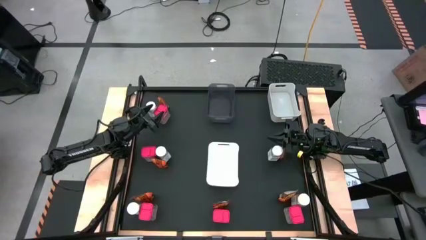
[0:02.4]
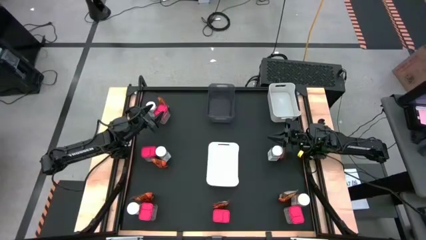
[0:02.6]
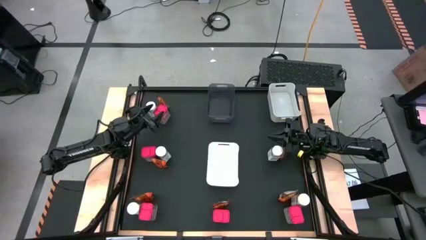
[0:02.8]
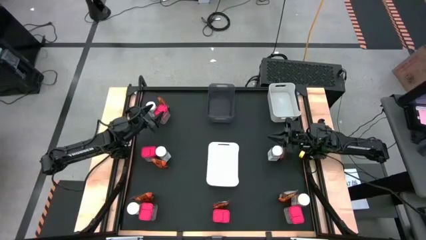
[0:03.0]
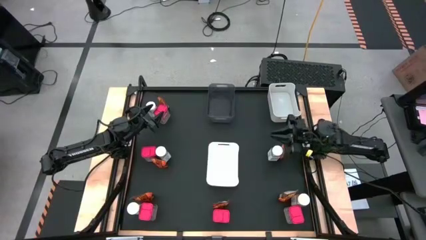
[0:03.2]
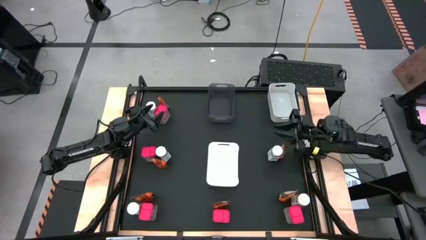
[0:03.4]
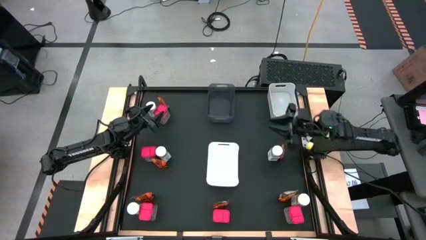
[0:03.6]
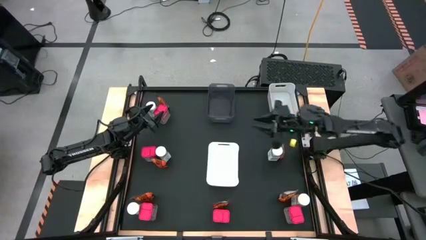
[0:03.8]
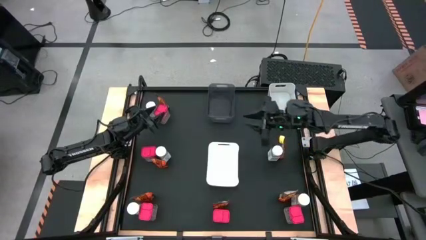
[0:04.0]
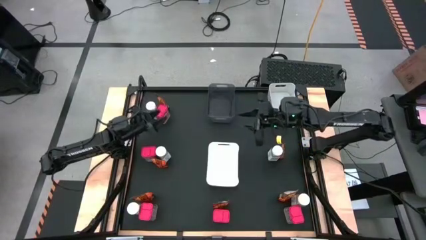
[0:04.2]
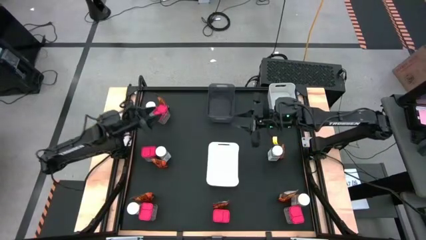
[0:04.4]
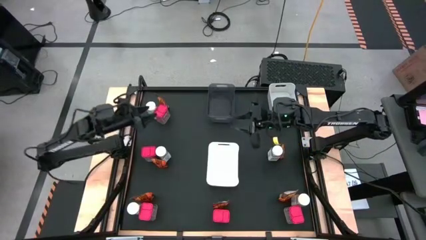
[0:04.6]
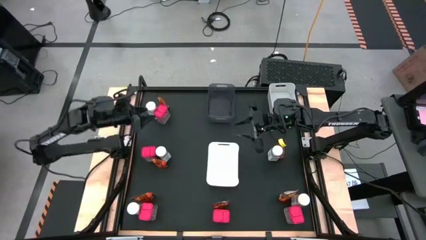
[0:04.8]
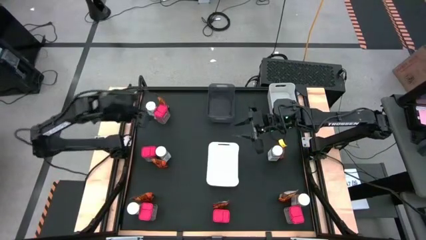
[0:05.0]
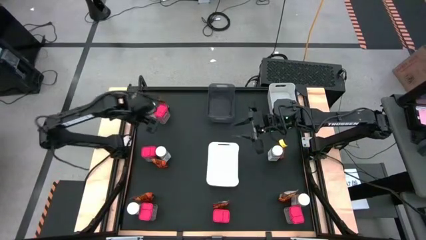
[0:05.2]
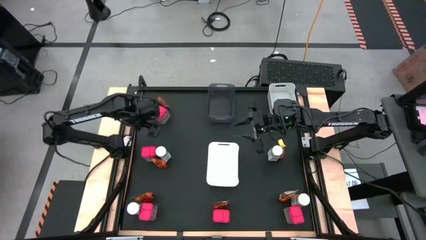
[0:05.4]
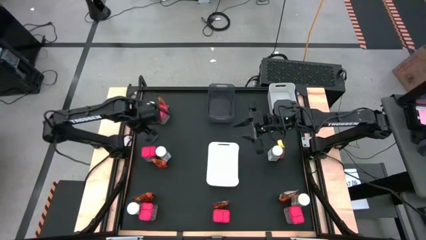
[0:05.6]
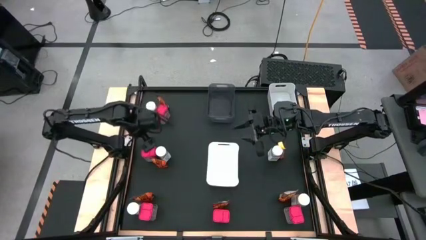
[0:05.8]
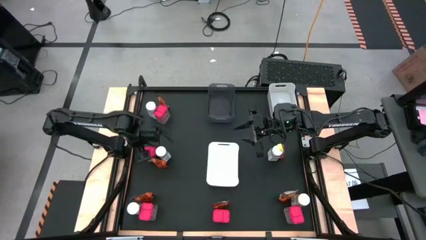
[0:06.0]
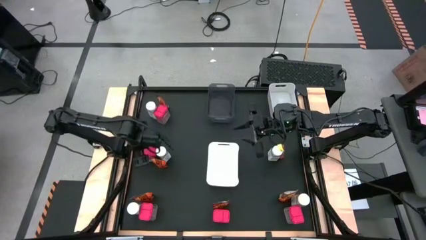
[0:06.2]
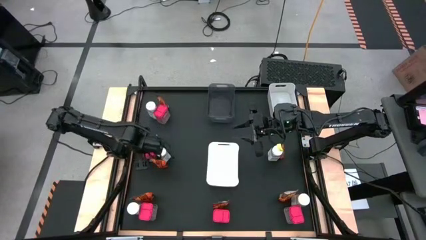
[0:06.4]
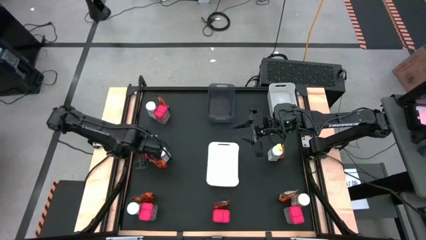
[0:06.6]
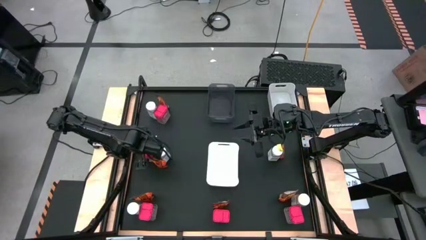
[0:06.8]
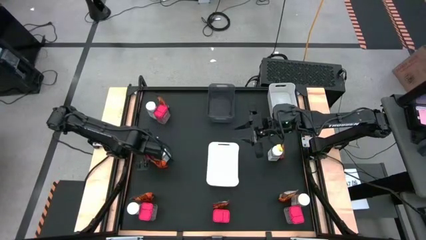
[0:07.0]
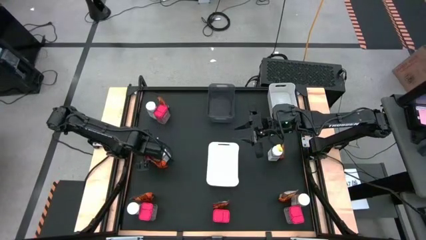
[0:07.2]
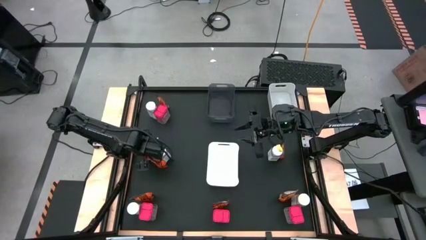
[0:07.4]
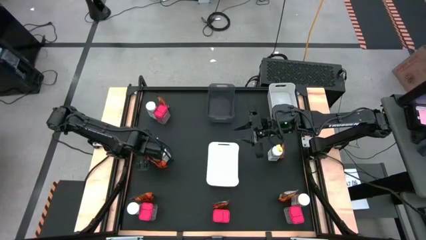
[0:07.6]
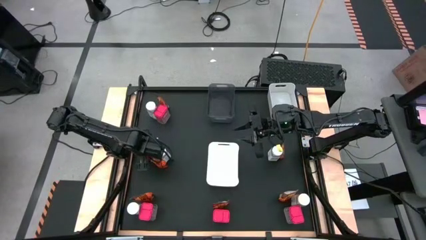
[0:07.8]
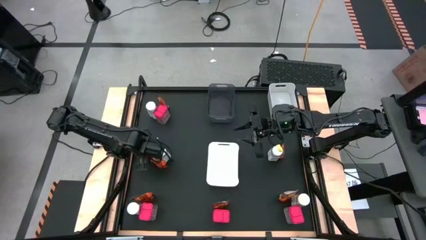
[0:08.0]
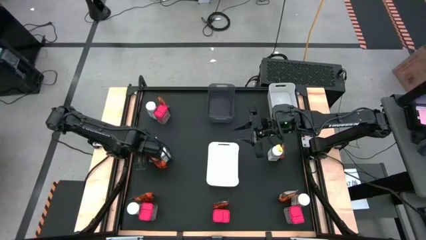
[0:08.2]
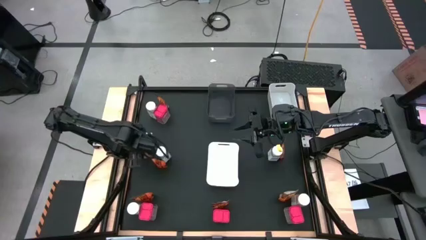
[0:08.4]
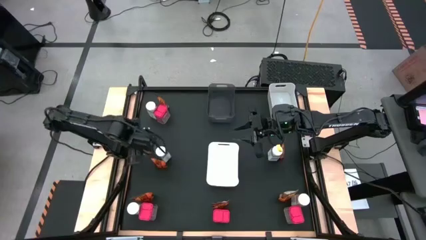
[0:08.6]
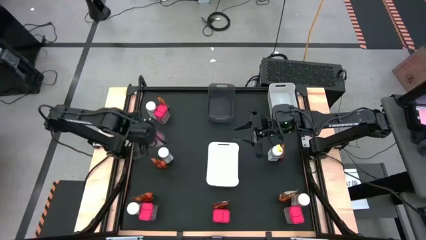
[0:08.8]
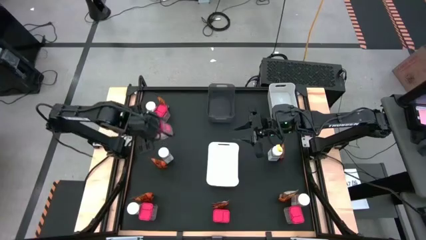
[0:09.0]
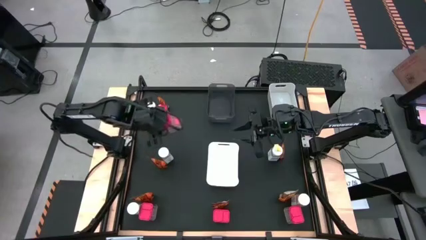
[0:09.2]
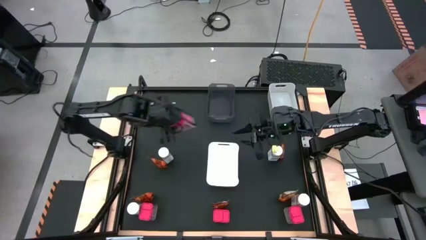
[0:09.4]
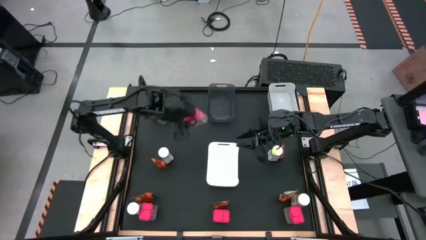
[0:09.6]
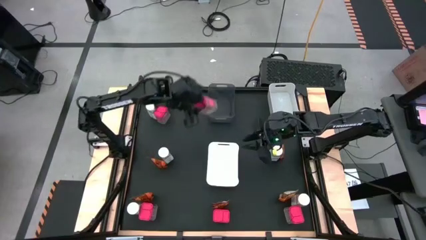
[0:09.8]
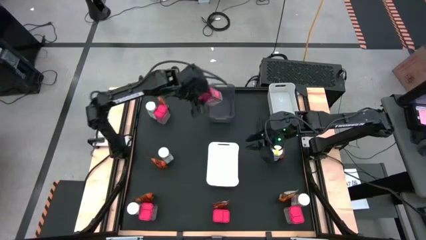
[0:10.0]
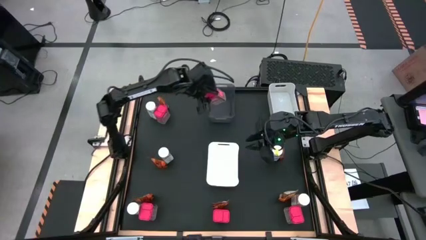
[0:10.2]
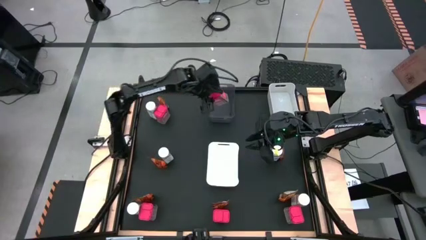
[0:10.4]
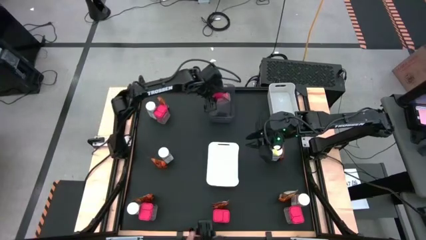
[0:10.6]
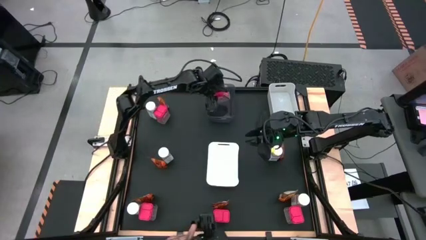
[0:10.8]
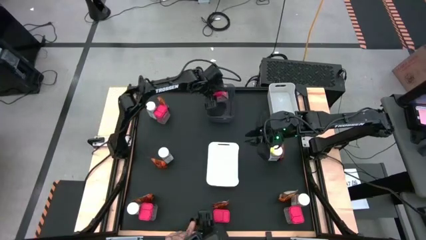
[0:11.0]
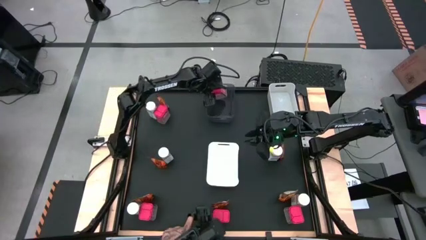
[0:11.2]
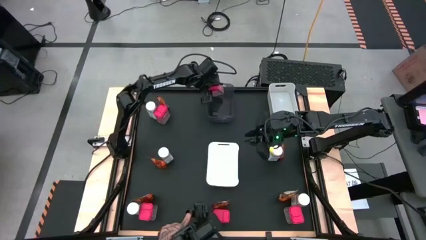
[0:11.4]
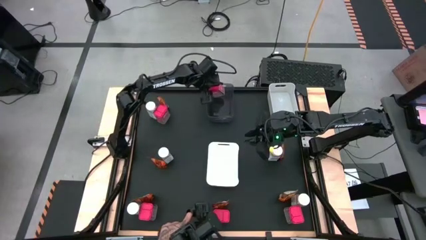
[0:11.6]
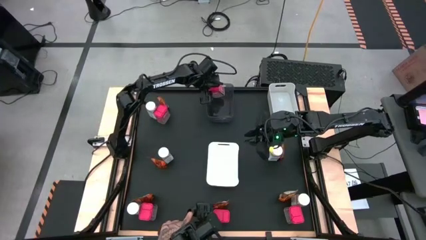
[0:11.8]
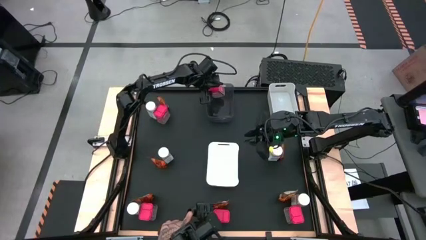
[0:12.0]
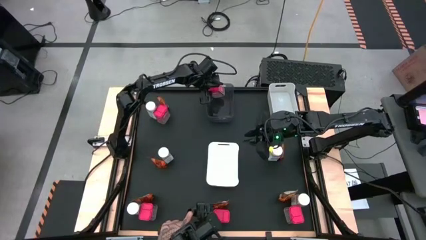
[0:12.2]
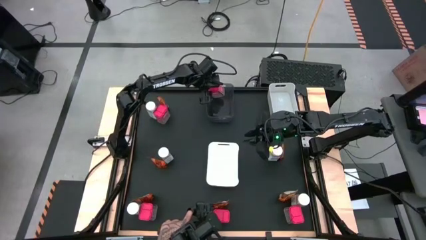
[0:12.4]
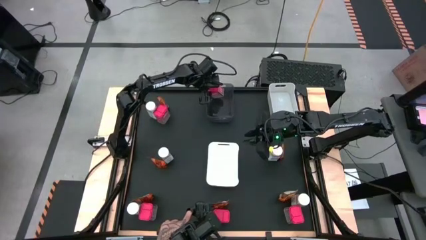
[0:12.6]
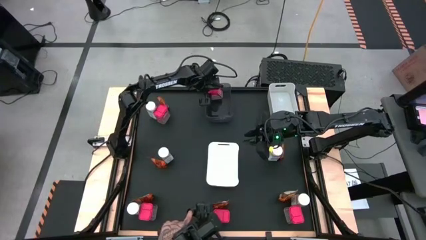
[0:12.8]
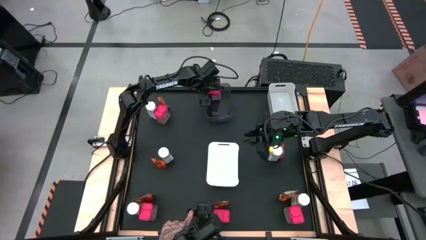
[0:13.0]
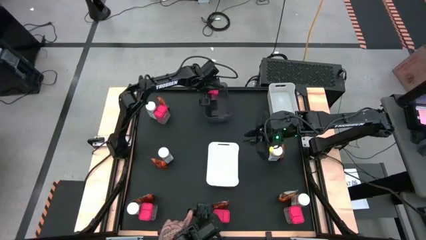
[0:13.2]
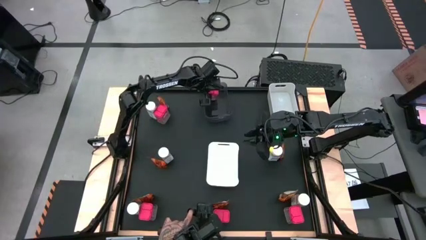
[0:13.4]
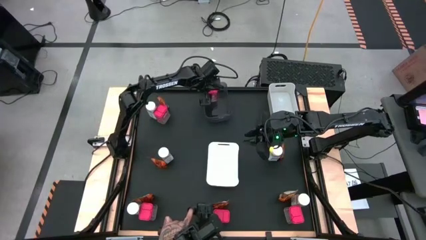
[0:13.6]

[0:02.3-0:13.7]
Task: Sort spices by type
Put the red seasoning can into the black bin

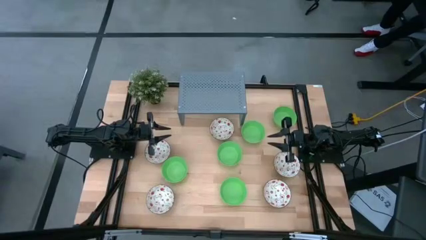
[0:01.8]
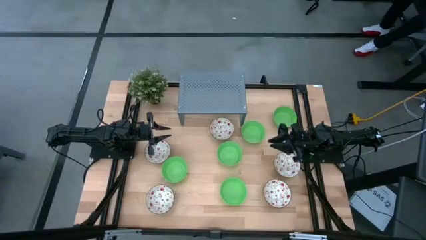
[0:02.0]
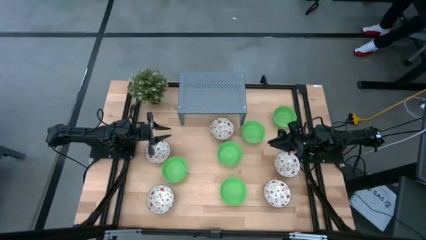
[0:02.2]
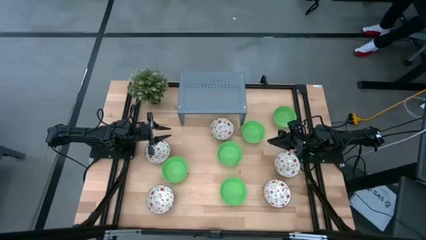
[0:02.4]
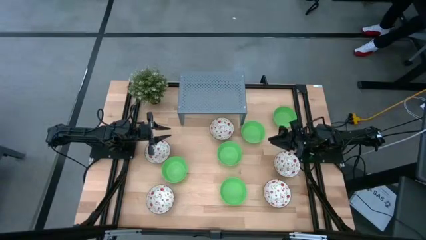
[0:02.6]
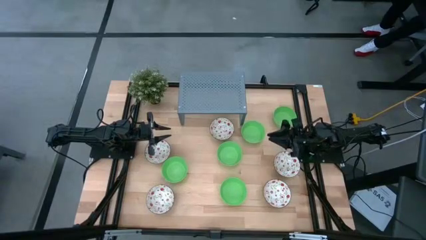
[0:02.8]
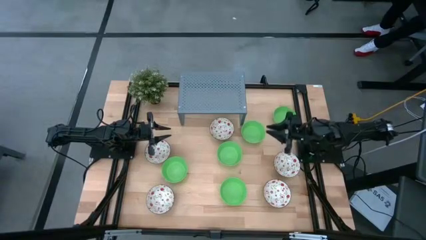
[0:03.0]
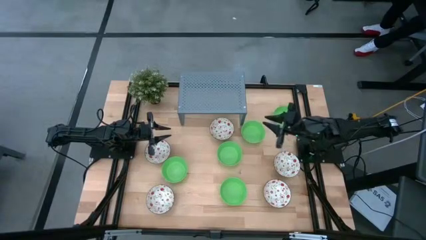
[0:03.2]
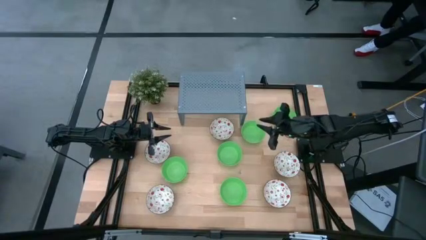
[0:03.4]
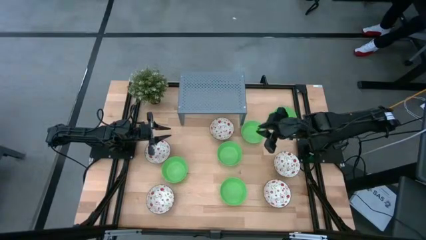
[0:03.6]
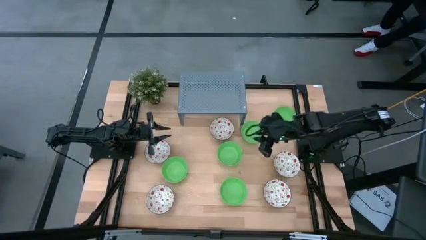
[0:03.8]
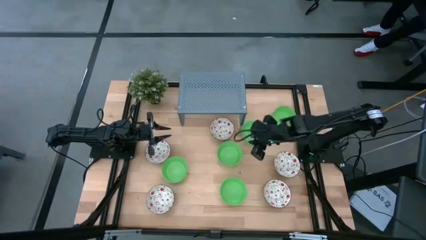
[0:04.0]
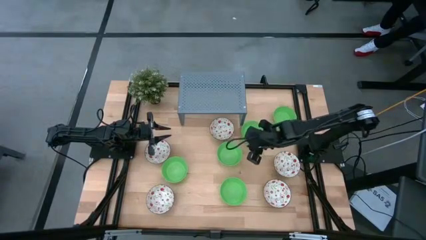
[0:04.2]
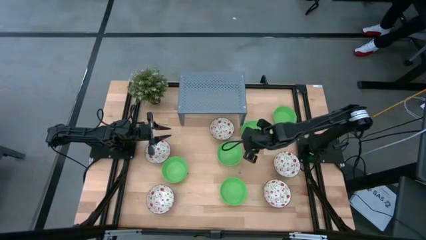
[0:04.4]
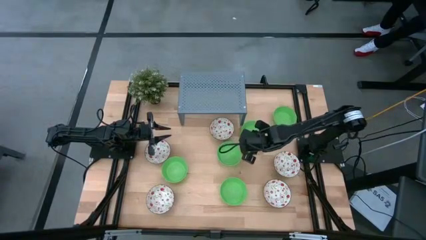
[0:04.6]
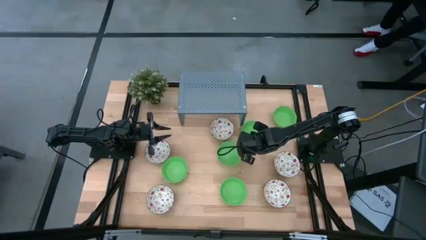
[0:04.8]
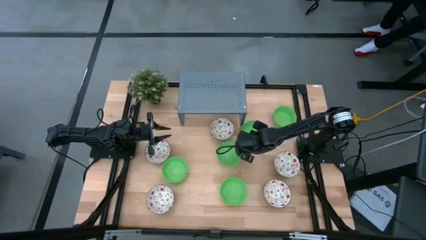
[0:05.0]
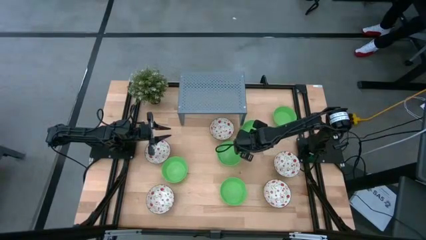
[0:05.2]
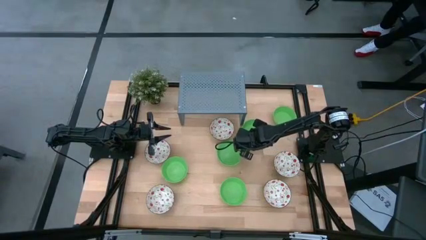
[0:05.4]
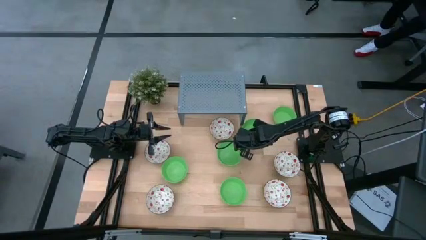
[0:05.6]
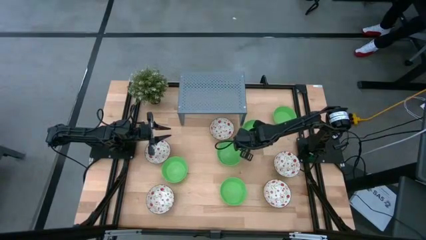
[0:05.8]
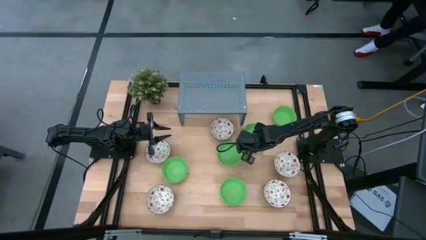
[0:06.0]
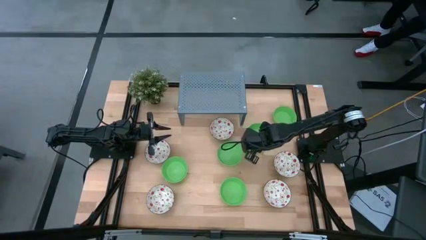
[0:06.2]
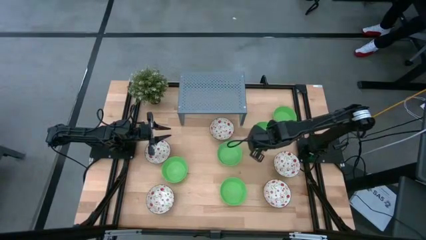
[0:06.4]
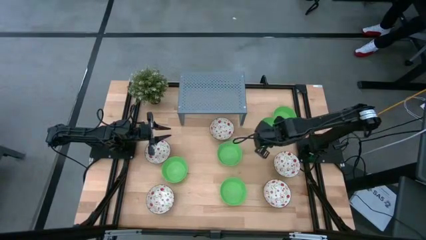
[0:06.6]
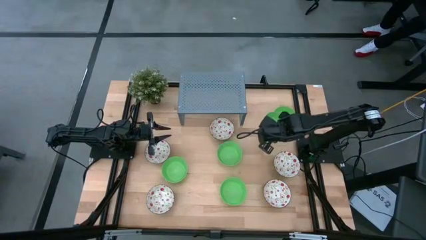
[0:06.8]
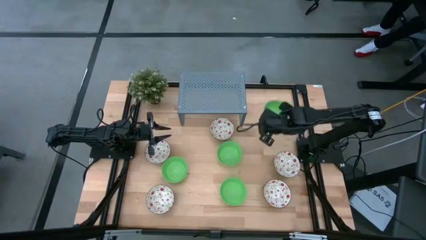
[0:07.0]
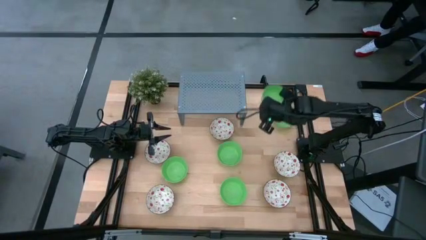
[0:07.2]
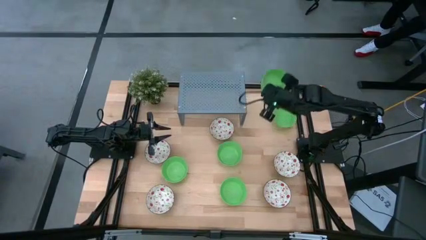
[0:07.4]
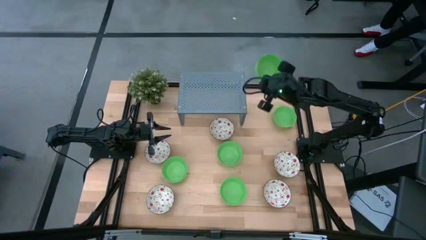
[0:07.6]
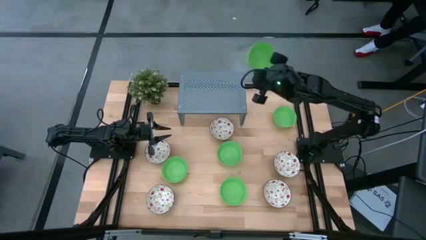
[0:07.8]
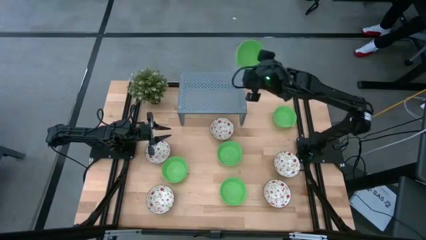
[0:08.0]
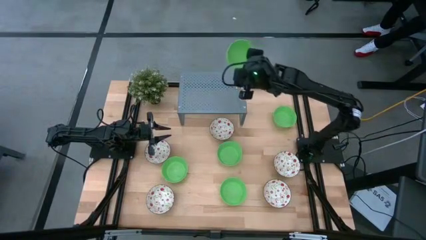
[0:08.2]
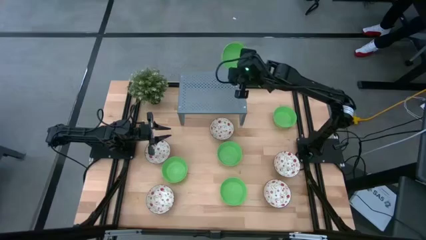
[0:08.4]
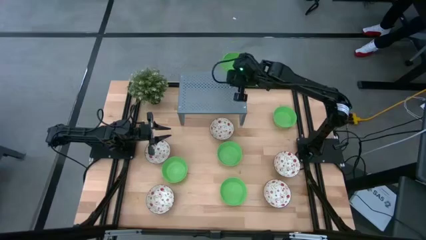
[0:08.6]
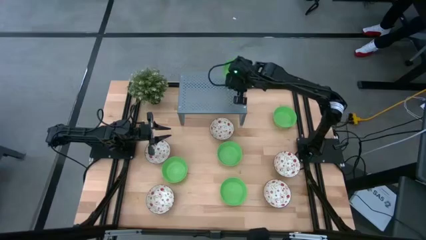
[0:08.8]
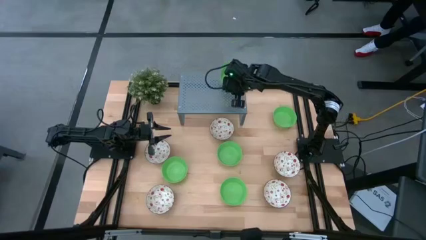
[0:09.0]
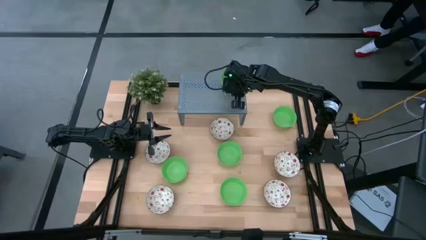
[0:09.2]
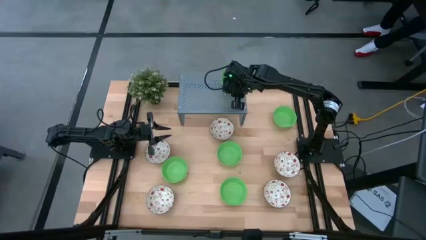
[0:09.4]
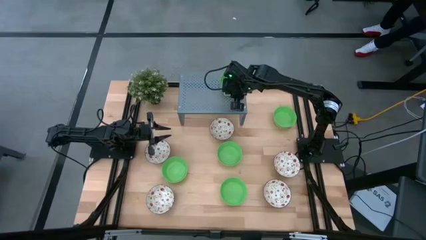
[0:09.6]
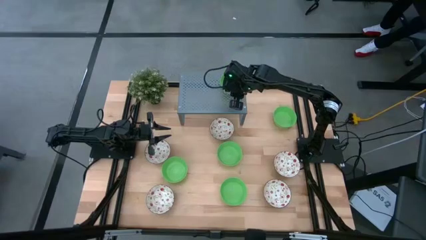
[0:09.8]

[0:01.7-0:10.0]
Task: Pick & Place Mini bowls
Put the green bowl on the shelf
